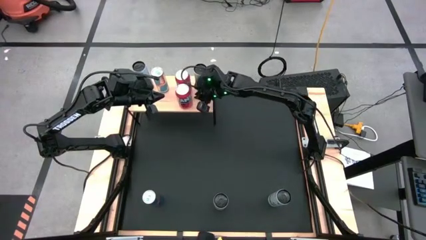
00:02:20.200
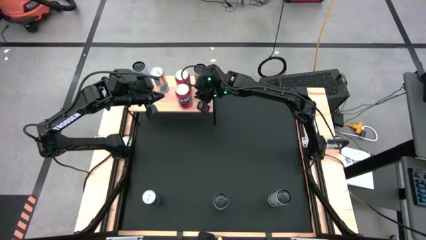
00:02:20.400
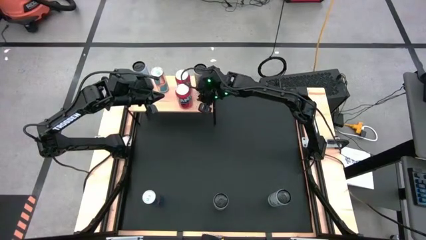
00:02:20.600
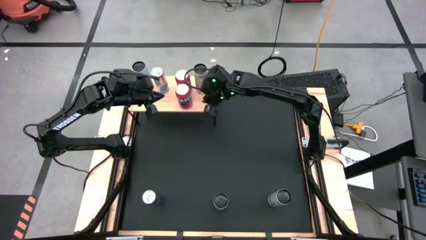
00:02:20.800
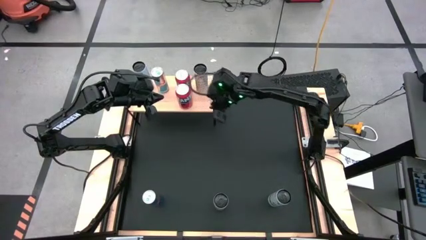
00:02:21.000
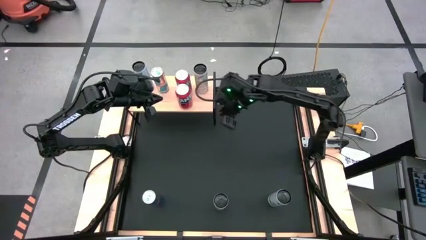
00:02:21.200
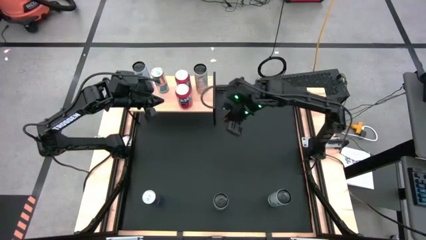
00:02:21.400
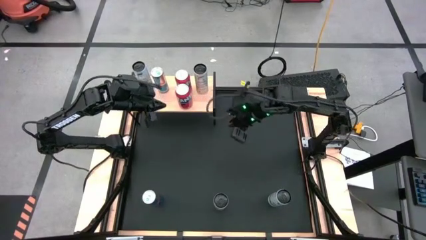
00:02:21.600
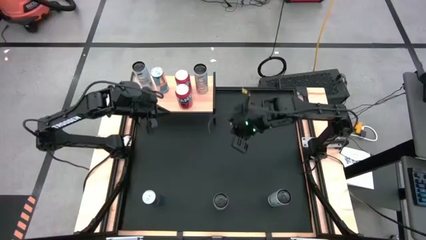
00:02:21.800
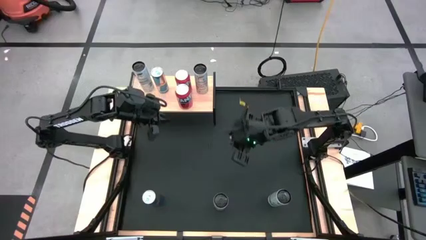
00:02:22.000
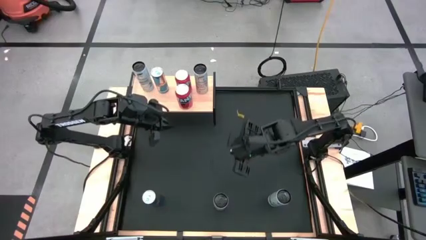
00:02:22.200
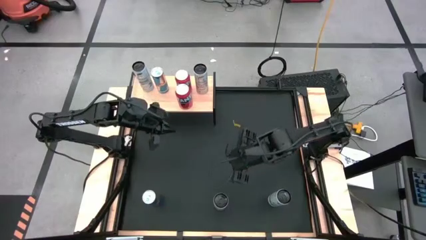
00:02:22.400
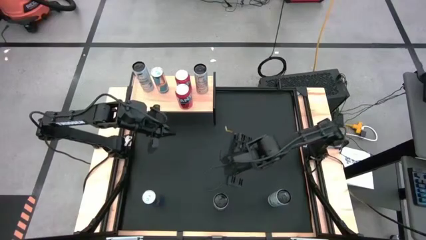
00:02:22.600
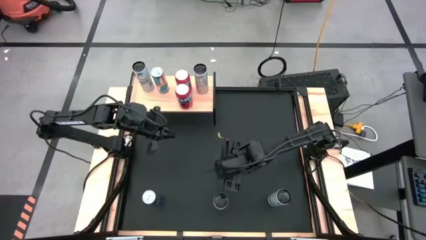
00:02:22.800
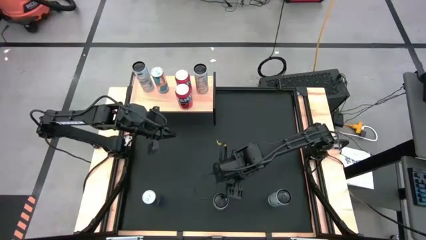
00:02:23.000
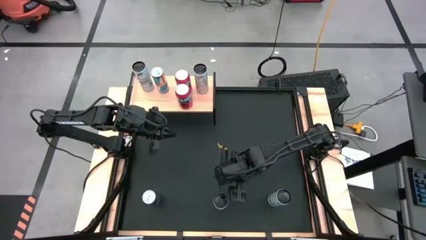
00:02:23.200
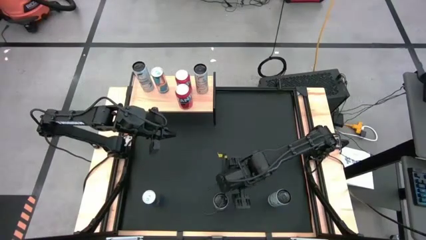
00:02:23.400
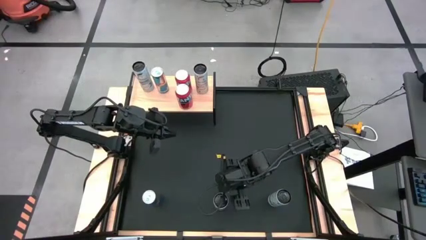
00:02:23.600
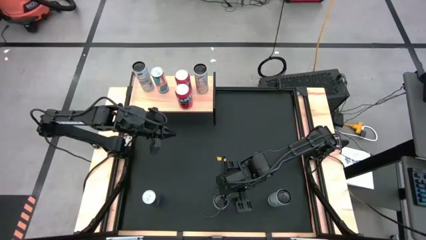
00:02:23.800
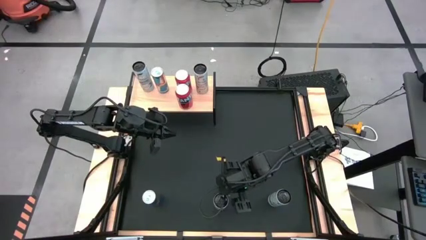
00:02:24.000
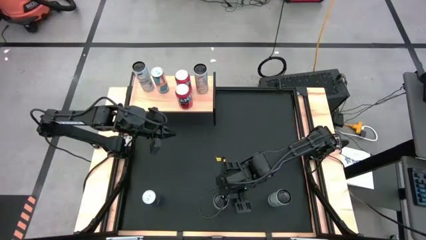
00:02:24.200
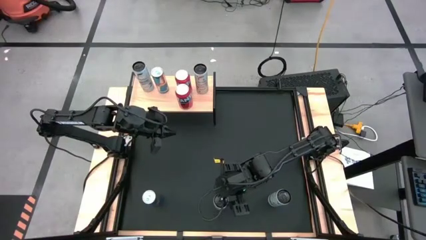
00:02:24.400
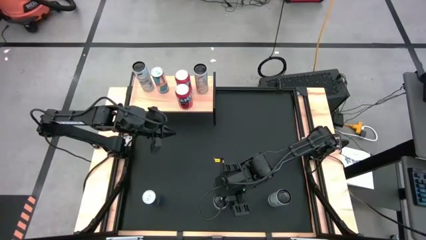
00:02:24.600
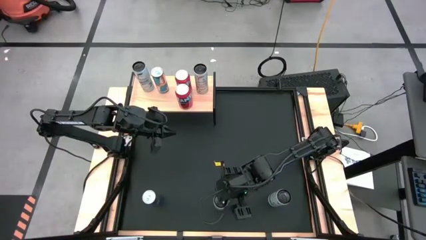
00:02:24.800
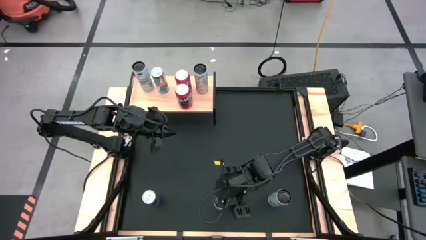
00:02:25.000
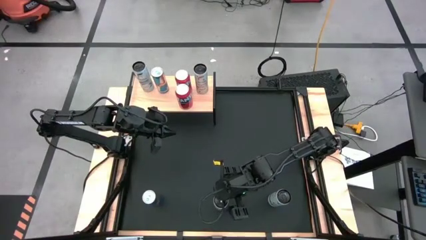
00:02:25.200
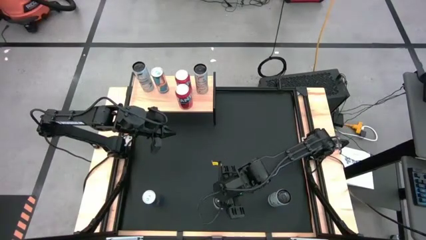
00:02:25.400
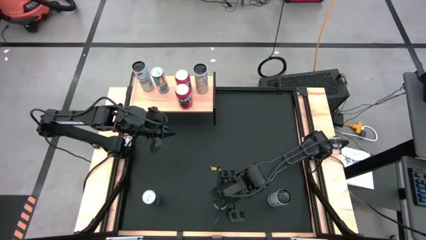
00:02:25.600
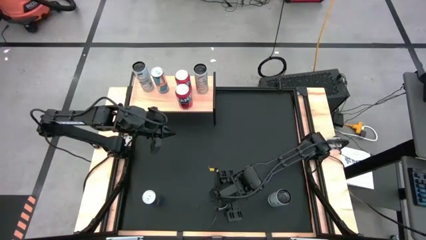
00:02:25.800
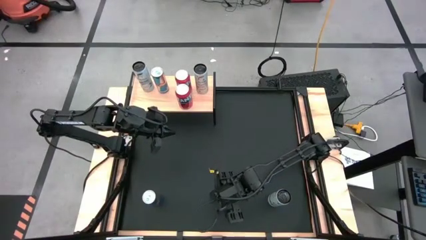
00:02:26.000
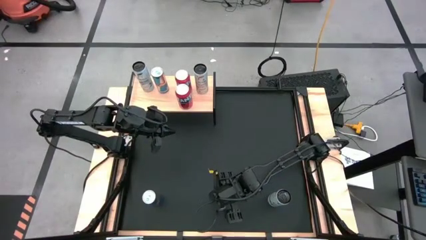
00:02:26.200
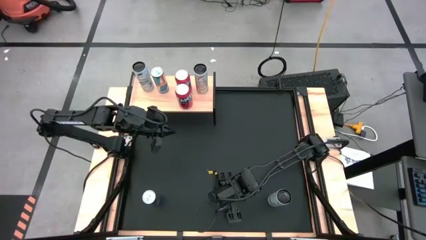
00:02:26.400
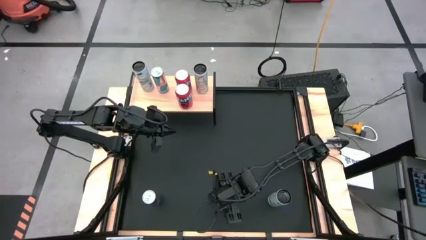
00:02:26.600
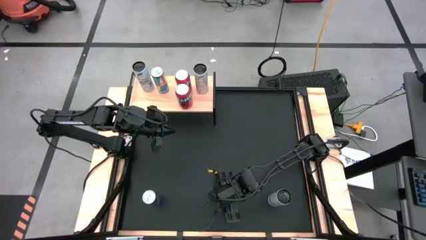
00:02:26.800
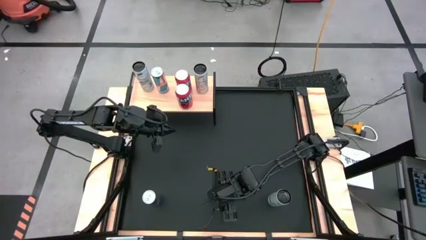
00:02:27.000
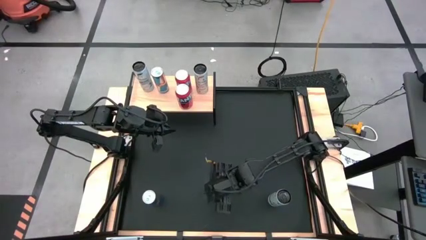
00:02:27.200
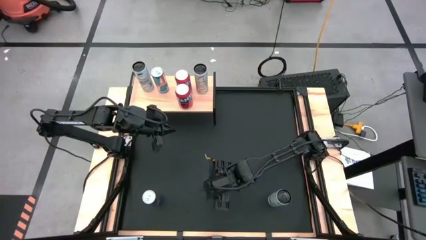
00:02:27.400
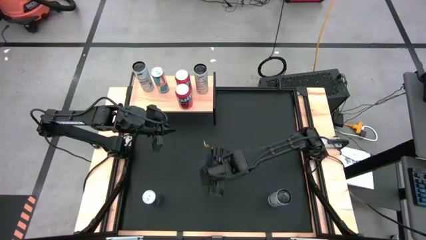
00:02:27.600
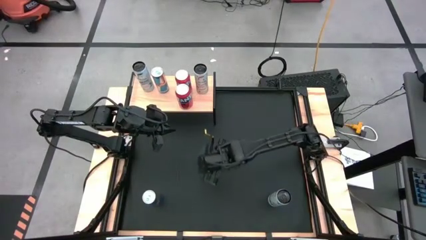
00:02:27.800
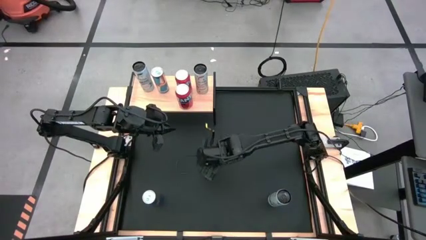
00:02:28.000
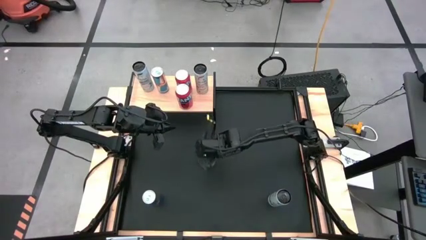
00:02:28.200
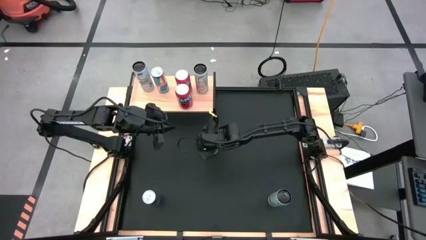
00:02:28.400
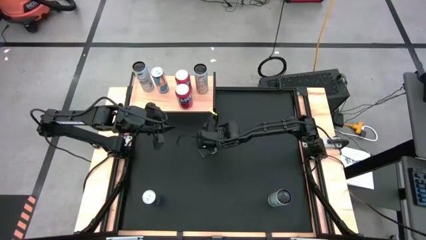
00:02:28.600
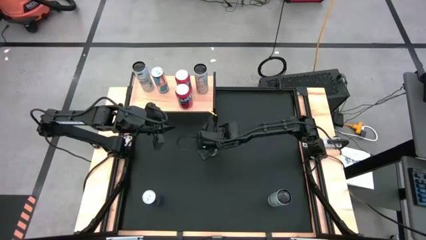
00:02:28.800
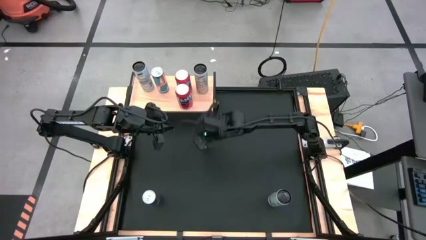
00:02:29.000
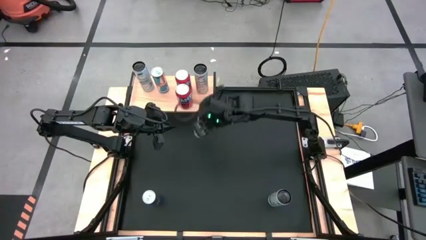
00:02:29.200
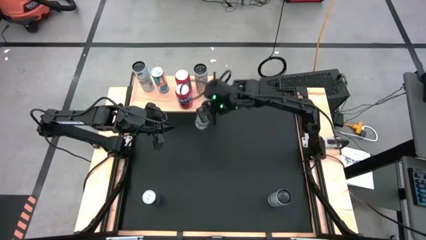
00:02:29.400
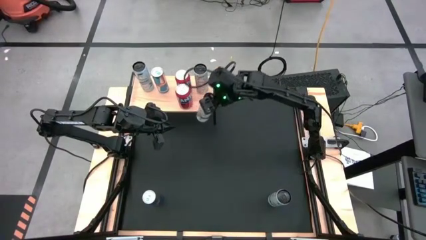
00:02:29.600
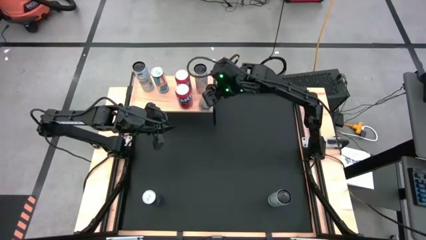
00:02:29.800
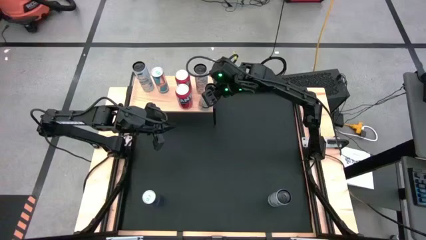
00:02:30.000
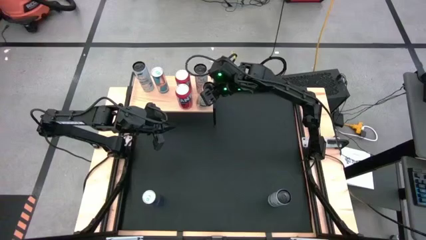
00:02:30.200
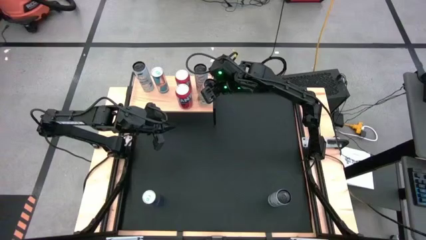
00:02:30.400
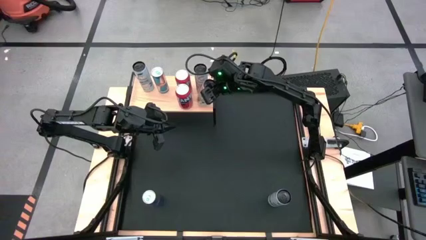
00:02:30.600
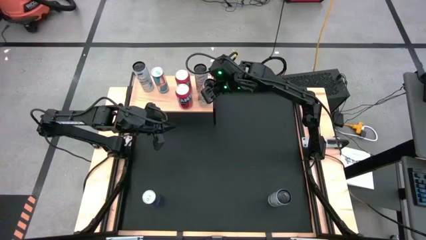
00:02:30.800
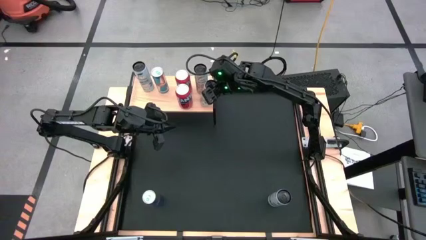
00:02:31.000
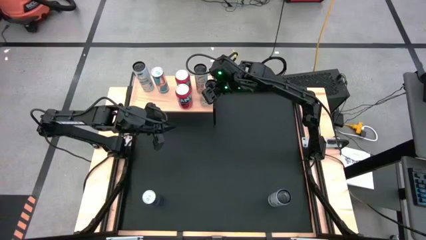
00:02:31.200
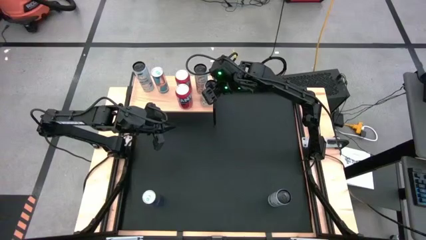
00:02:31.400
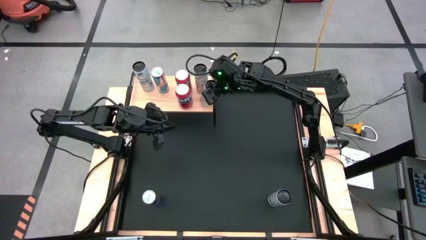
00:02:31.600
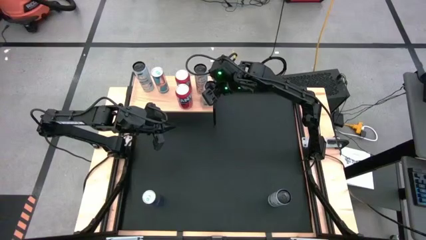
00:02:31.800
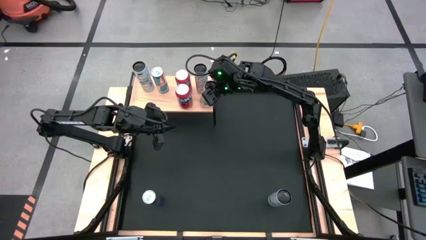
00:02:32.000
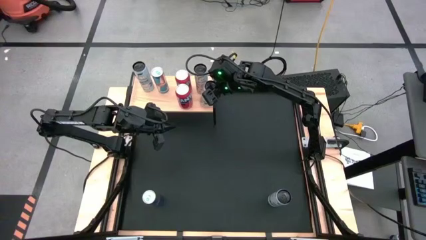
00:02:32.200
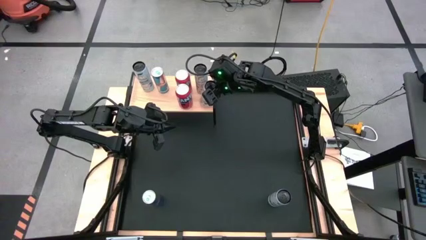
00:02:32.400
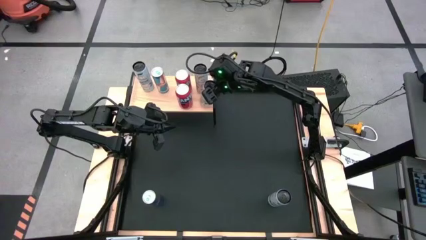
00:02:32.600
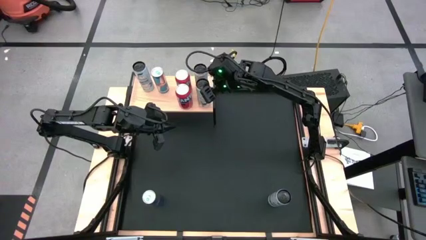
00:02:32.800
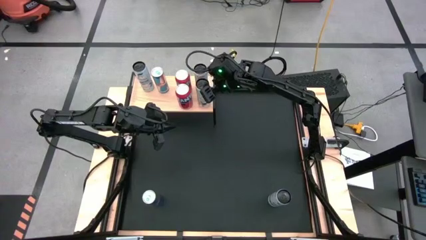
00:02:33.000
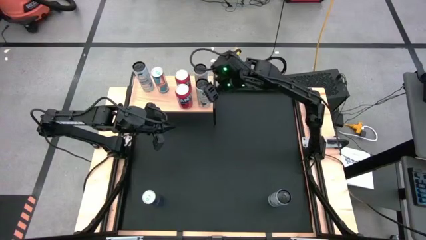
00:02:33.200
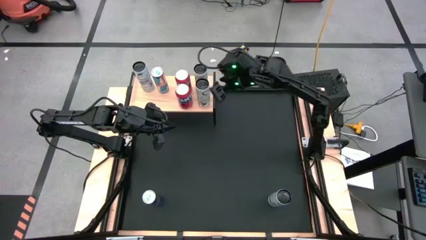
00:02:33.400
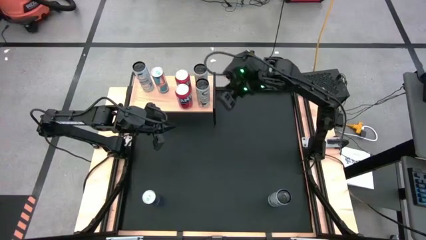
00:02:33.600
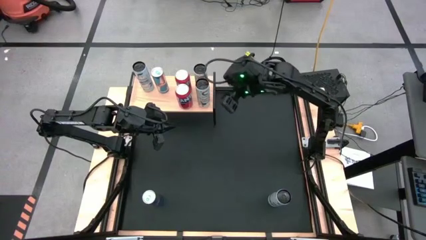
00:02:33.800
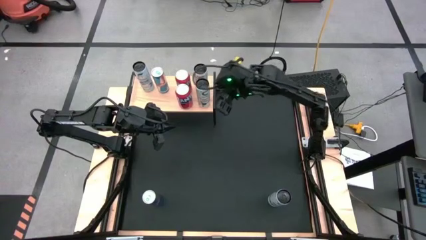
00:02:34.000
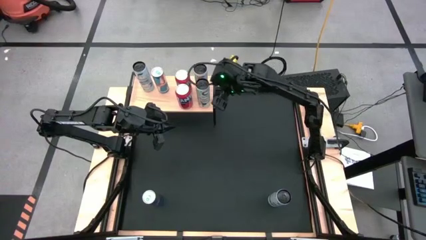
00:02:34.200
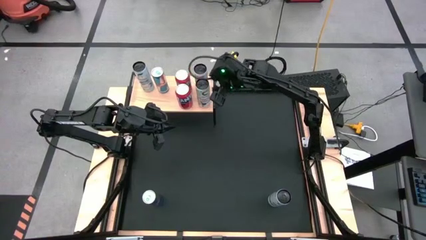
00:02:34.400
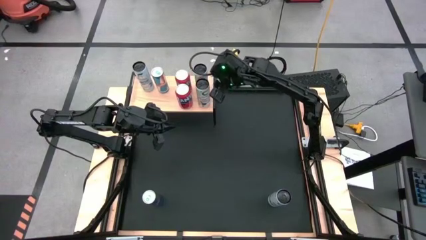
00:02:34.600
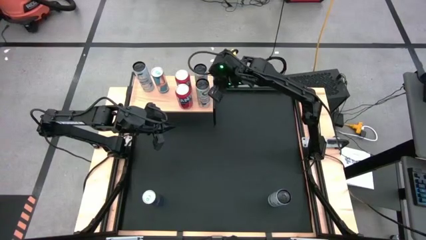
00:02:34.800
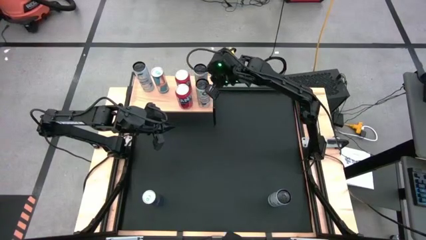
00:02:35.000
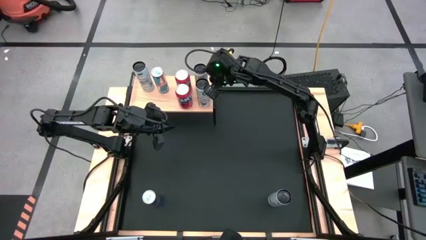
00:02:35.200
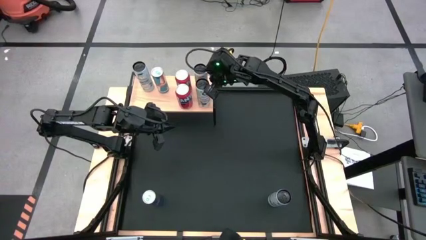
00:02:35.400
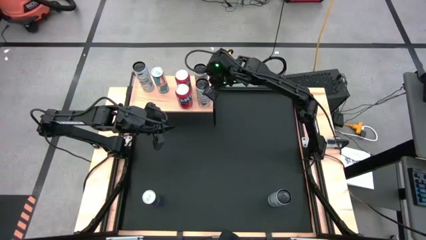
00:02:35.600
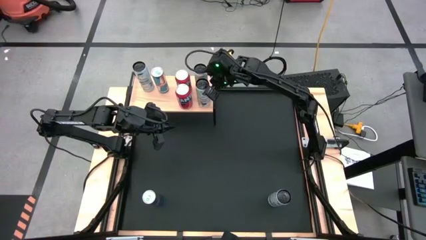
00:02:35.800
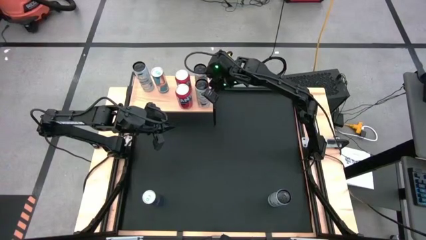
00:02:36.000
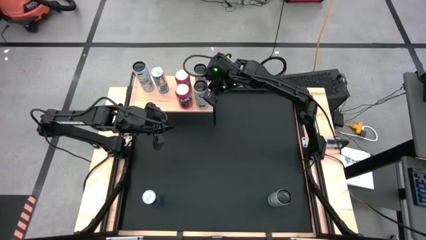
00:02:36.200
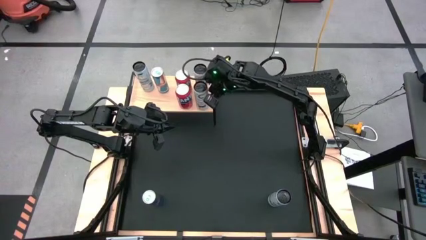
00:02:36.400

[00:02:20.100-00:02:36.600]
Task: Place canned beverage on shelf
Put the white-yellow soda can aligned with the other white-yellow soda can on the shelf
